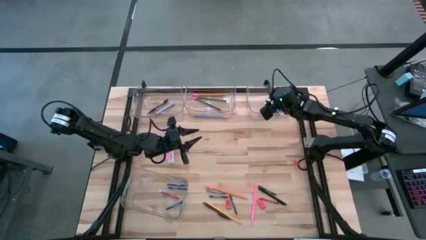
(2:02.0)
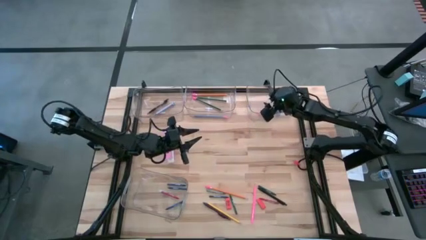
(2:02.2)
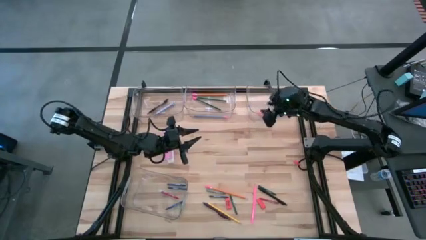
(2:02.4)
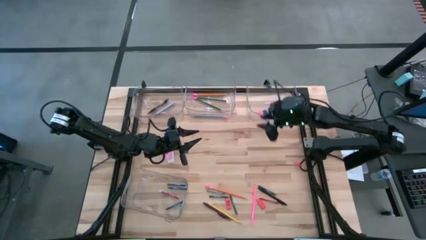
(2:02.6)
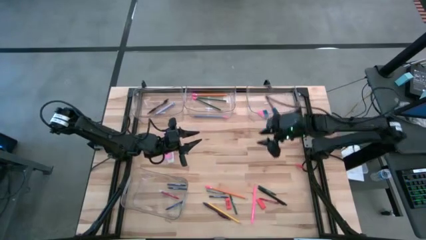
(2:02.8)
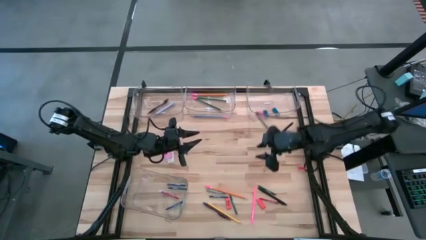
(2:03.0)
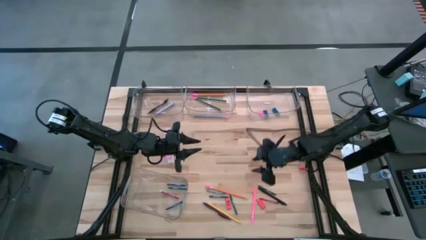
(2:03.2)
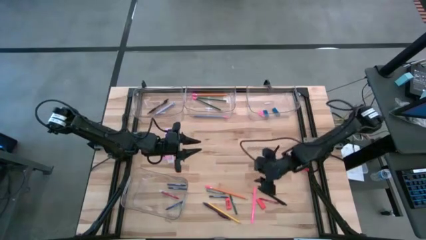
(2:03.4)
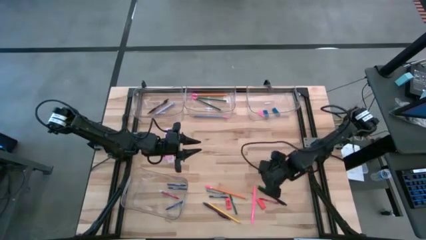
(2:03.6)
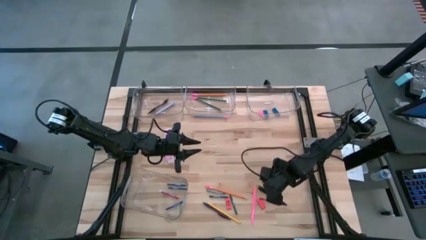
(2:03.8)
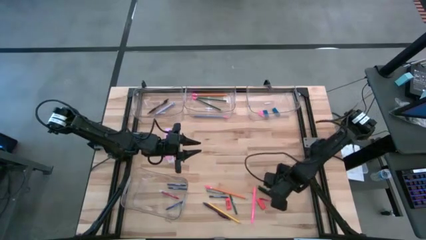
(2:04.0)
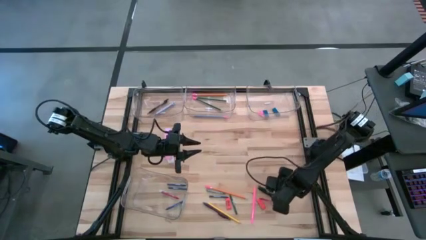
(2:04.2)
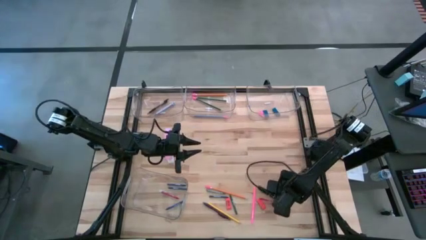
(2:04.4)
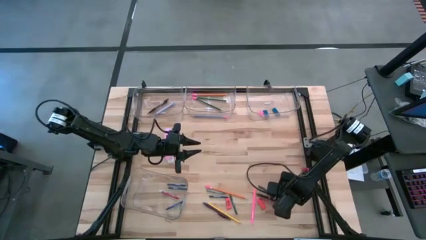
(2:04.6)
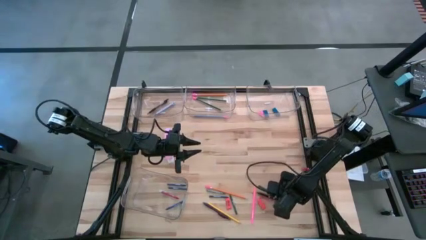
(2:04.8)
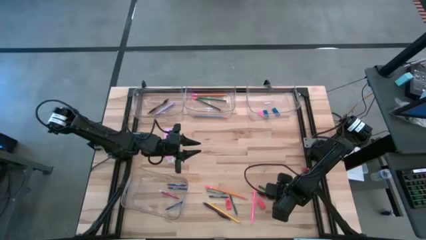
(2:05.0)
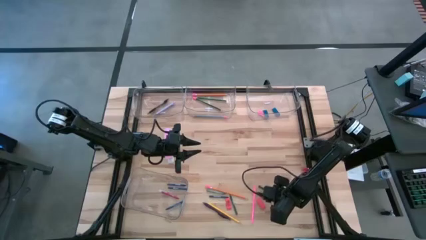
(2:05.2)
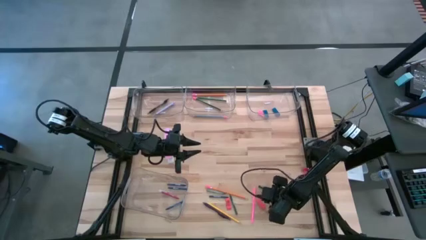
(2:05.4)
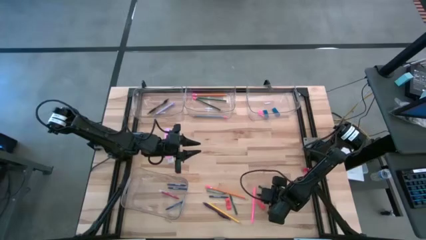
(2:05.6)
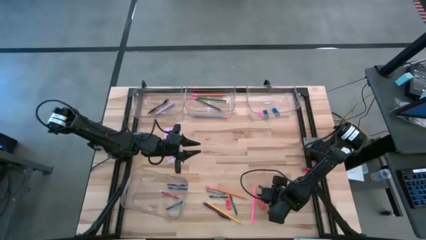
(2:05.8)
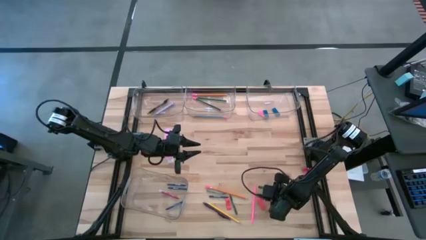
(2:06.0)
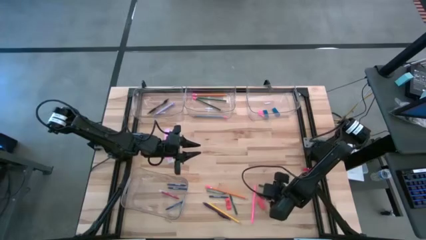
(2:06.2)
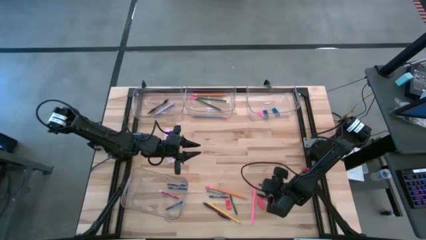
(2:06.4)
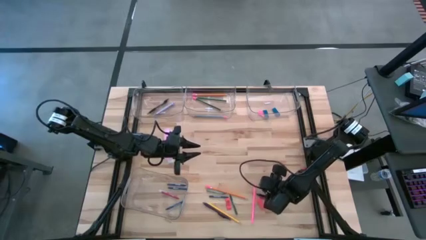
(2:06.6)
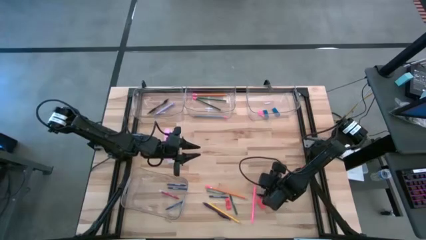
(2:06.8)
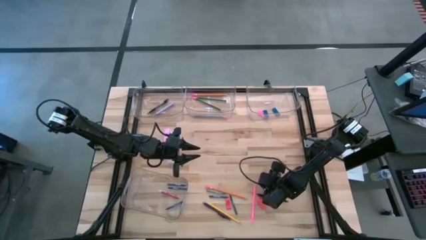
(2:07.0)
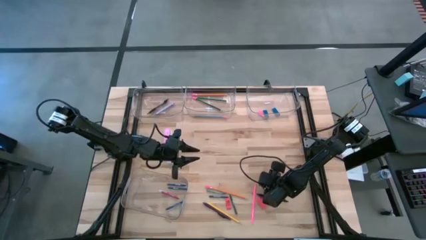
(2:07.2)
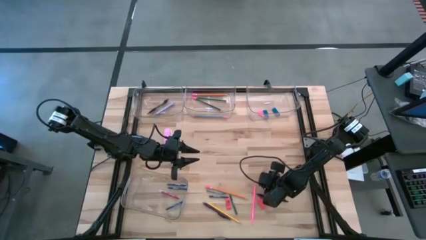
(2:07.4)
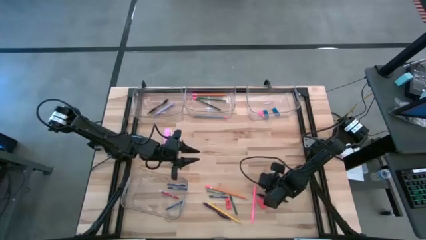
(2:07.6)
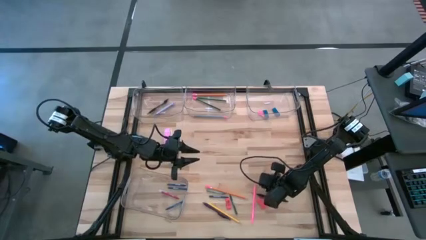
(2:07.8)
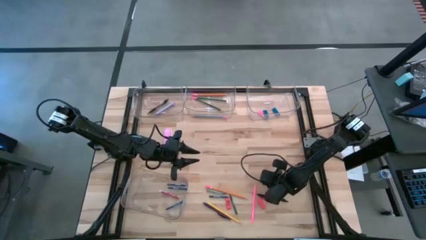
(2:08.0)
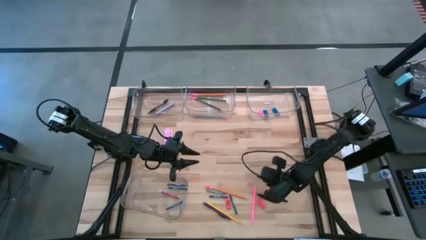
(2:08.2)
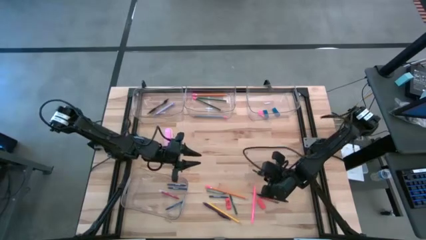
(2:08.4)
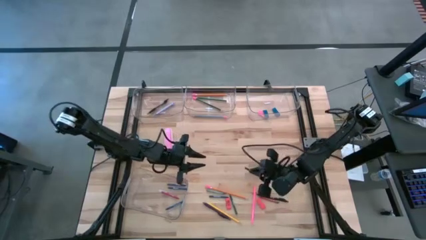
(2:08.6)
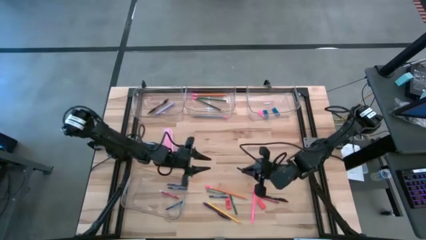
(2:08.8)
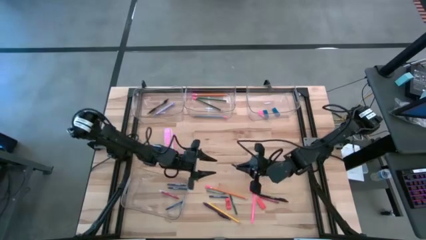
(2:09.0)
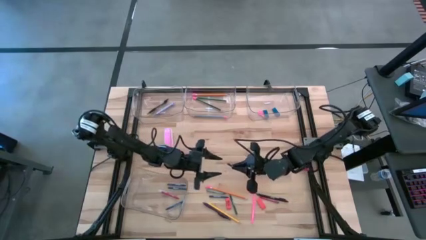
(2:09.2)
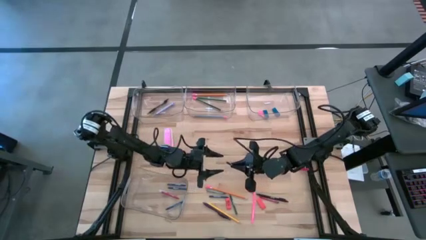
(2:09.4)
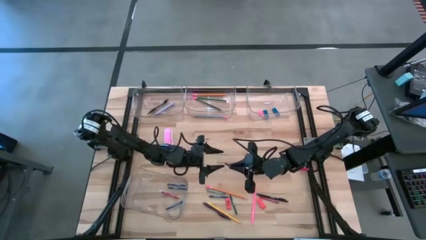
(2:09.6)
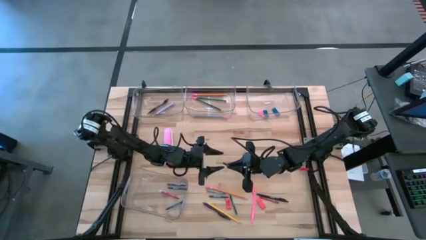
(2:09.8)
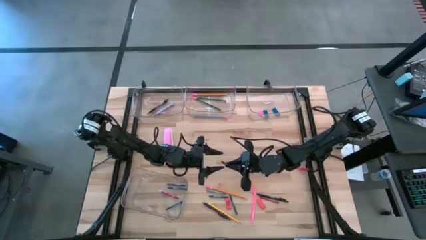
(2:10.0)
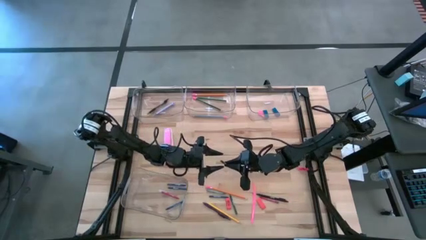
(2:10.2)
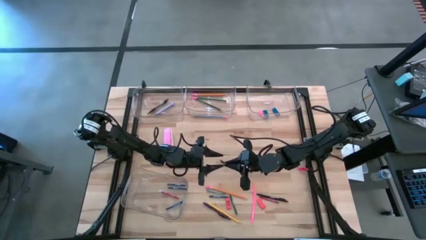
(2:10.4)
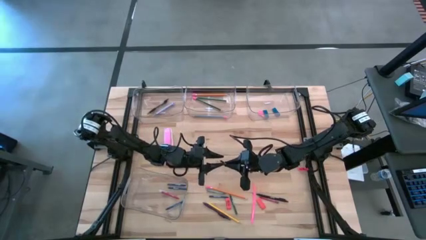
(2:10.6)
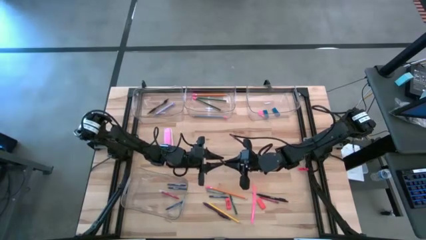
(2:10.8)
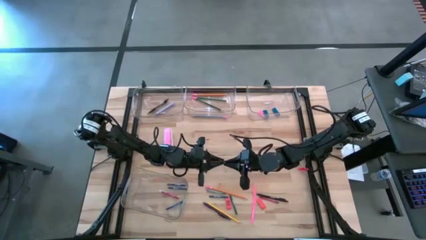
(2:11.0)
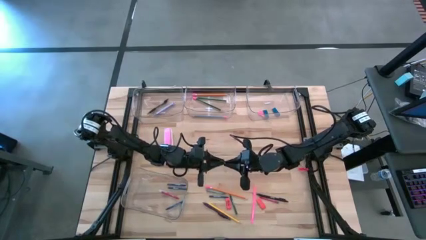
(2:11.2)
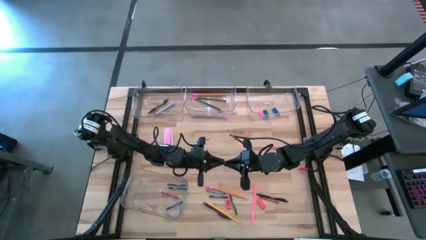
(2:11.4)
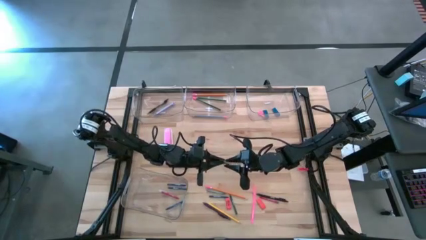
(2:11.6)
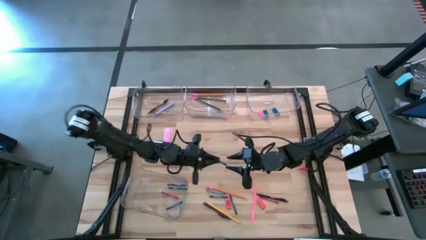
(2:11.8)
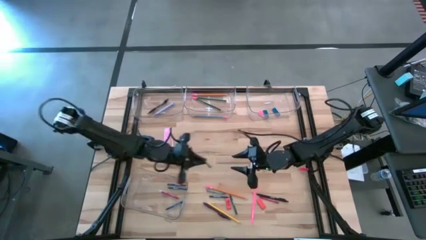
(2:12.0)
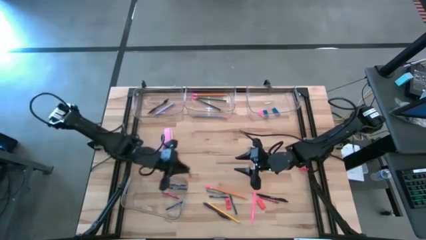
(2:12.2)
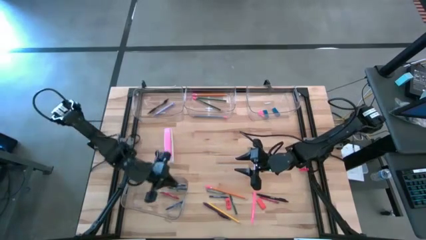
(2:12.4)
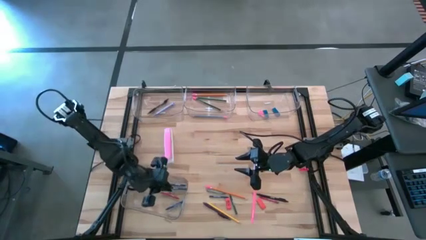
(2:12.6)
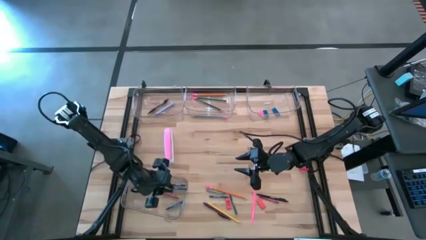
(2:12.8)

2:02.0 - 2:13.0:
Task: Sort crayons/erasers/pens/pencils in bins
Put the green crayon into the bottom left transparent bin

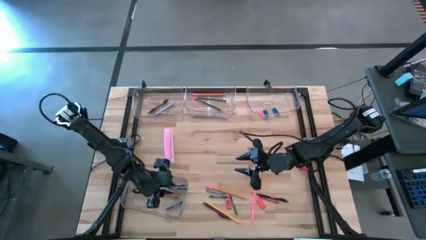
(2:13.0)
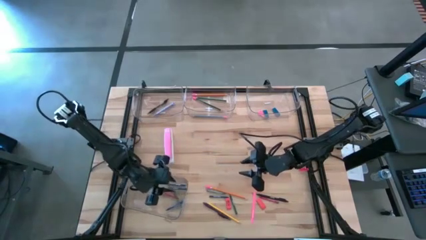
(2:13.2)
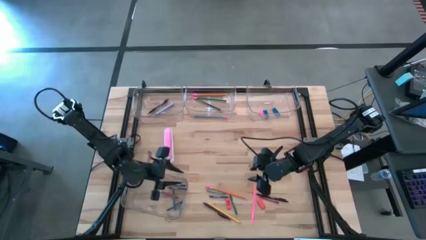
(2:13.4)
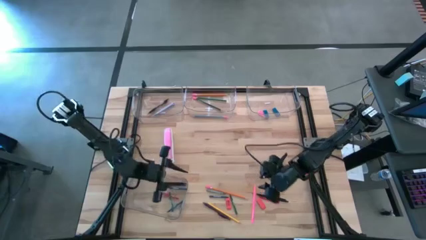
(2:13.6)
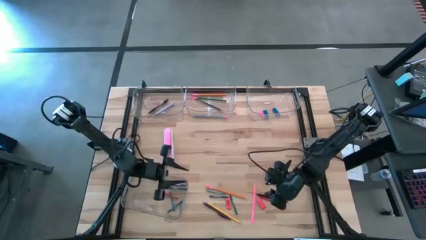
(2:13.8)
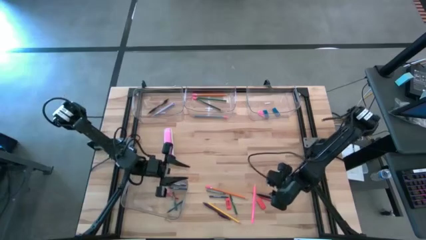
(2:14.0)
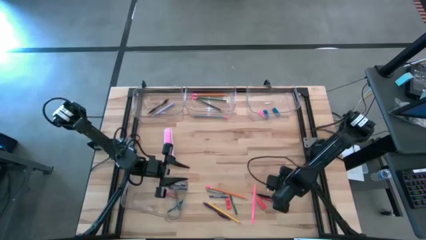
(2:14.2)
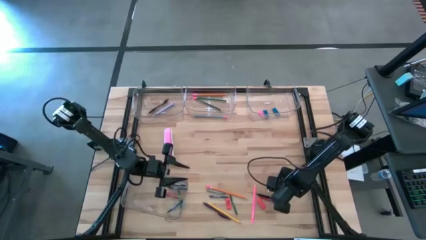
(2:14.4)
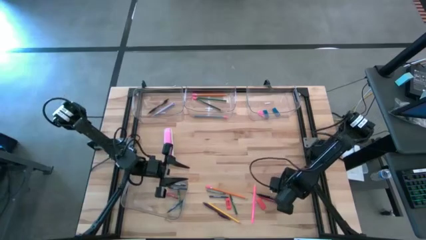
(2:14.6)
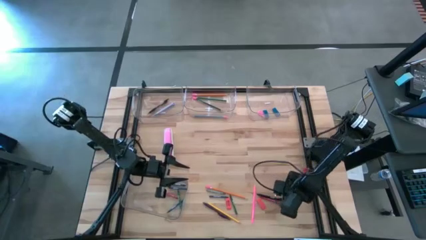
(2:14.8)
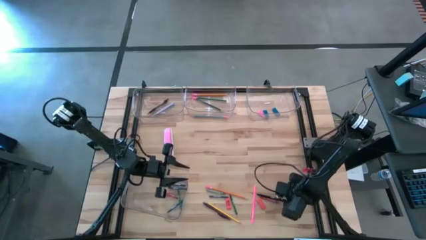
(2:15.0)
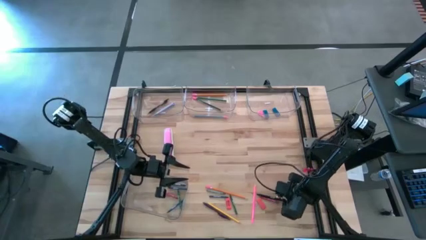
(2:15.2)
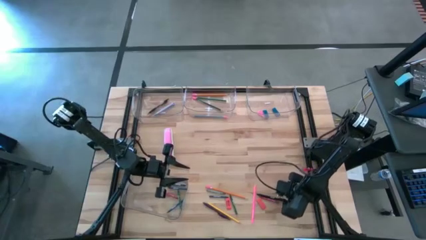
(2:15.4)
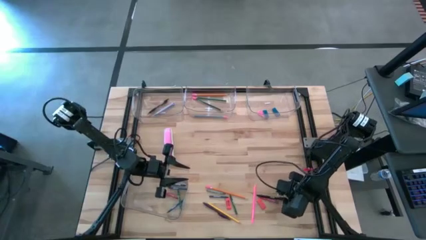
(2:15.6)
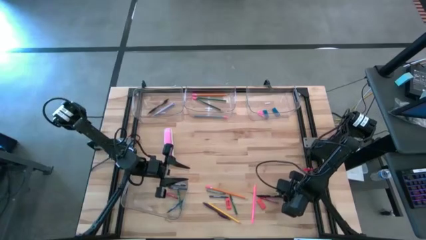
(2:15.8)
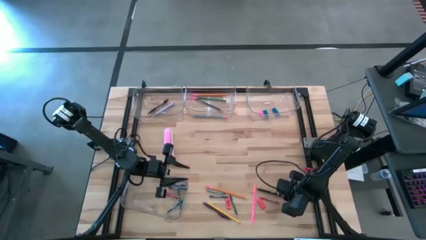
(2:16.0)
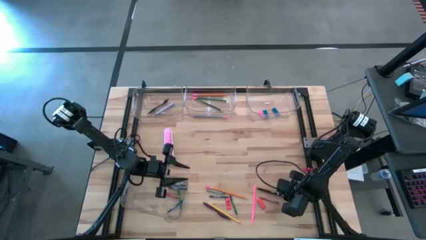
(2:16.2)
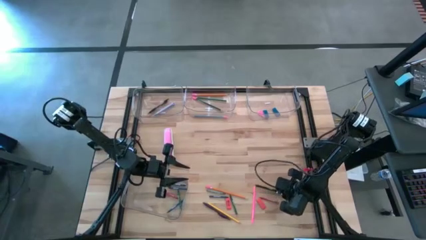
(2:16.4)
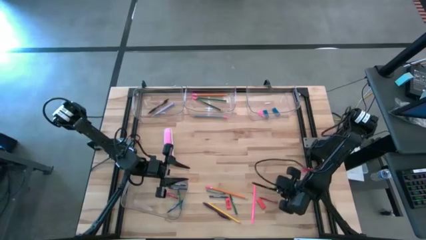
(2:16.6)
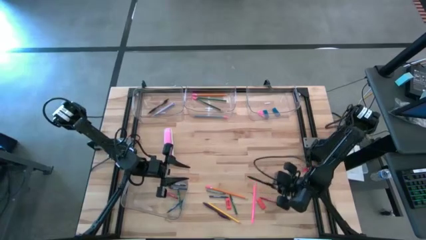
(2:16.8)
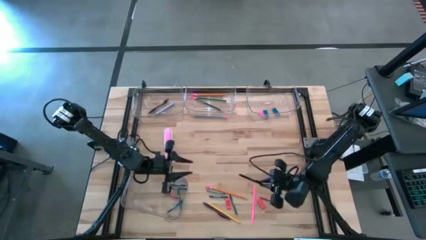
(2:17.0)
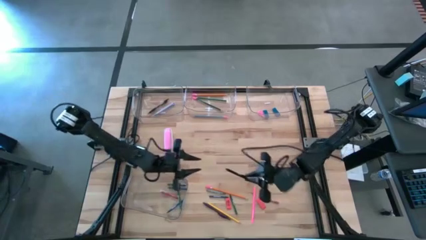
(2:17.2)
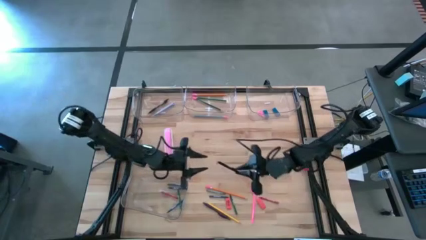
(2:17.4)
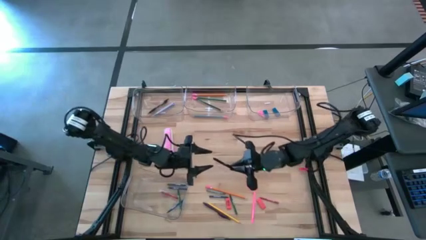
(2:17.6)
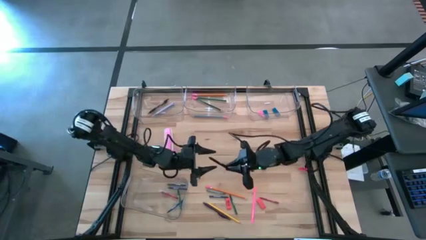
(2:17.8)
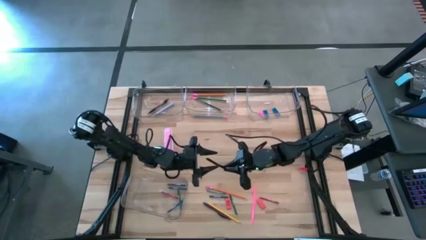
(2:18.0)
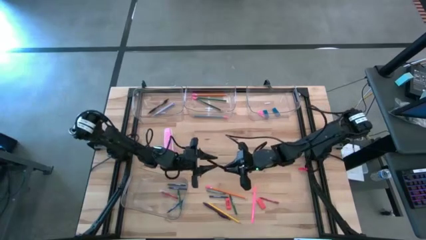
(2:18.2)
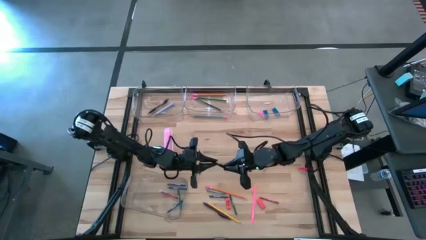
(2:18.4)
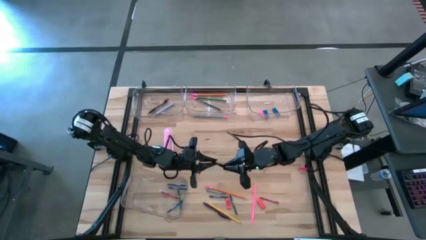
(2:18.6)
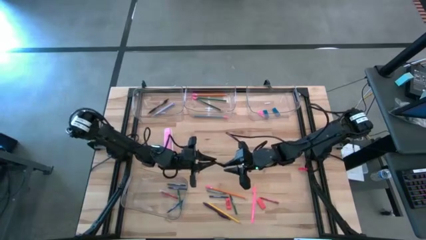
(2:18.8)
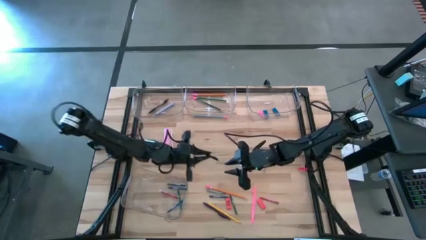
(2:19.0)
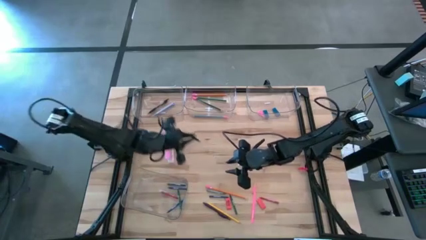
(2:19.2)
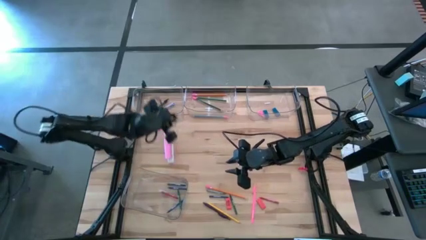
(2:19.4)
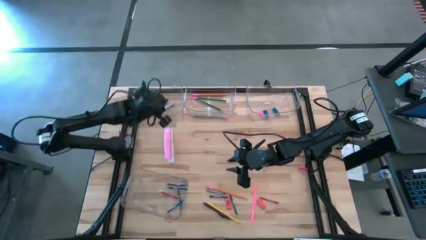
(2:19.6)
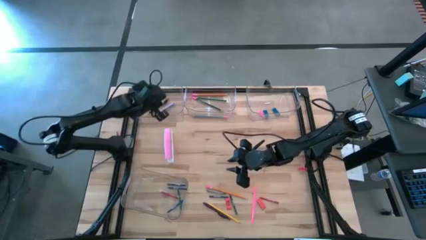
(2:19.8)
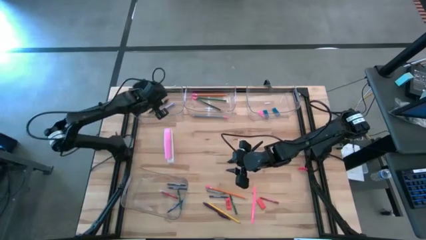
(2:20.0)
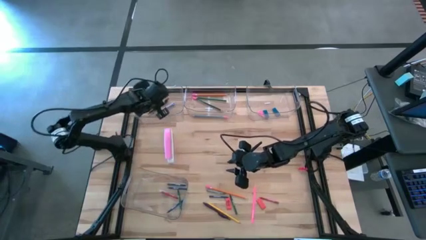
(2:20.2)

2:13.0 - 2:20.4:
Put the black pen into the bottom left transparent bin
